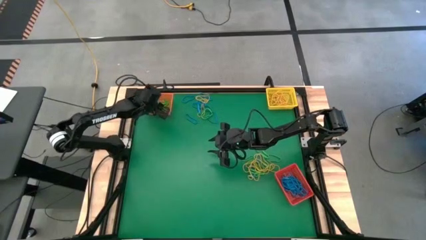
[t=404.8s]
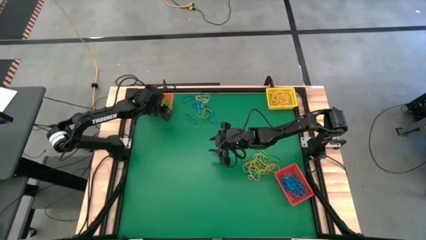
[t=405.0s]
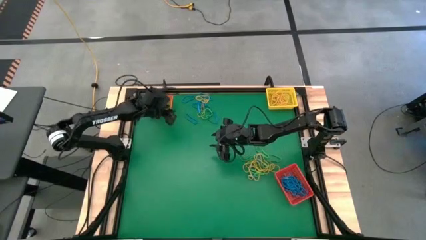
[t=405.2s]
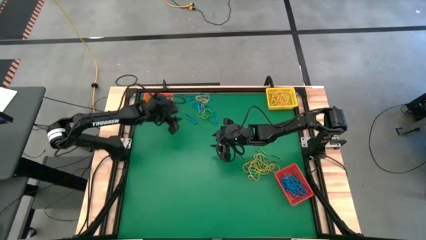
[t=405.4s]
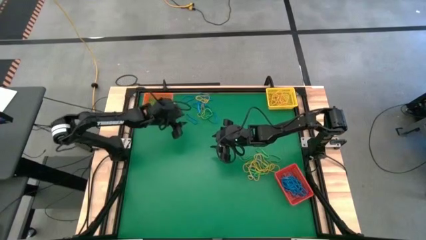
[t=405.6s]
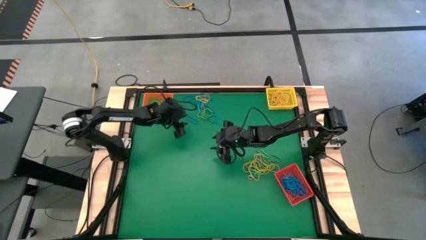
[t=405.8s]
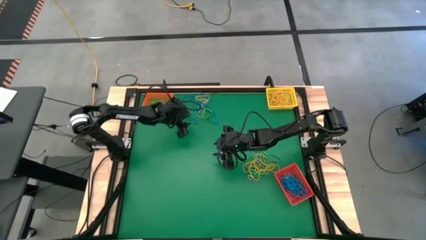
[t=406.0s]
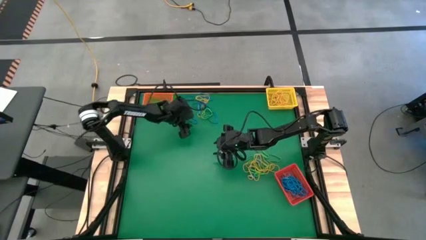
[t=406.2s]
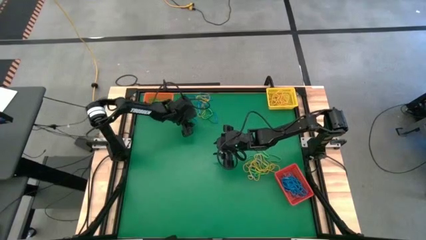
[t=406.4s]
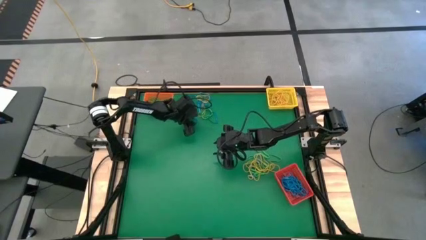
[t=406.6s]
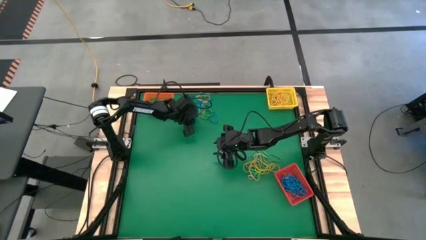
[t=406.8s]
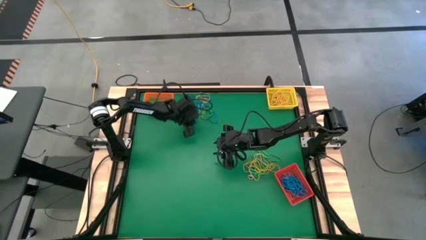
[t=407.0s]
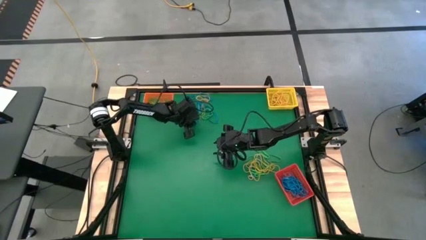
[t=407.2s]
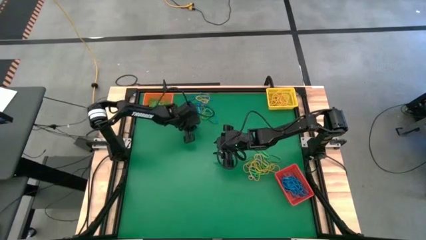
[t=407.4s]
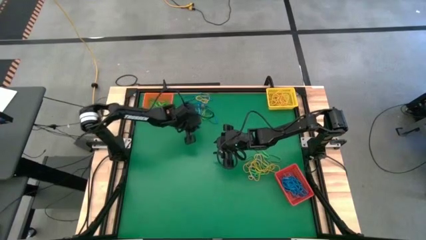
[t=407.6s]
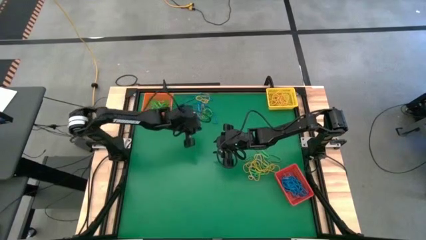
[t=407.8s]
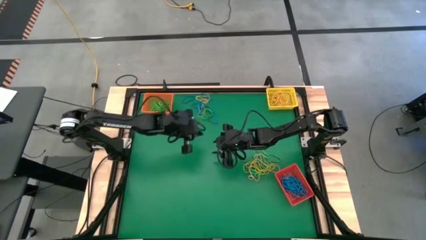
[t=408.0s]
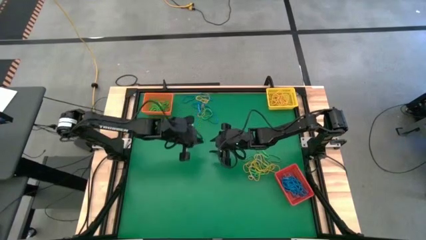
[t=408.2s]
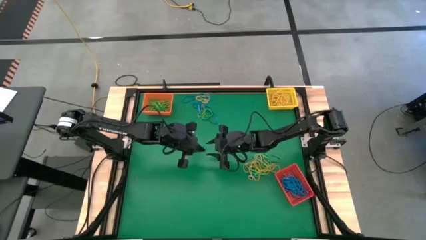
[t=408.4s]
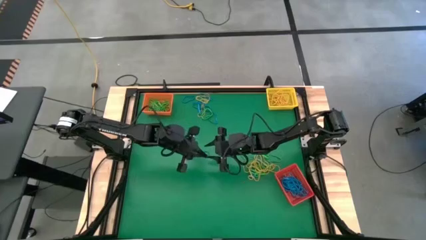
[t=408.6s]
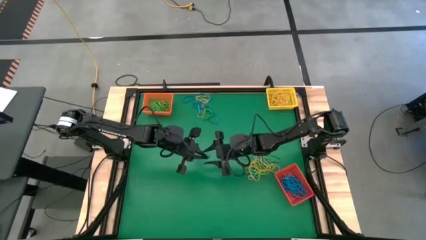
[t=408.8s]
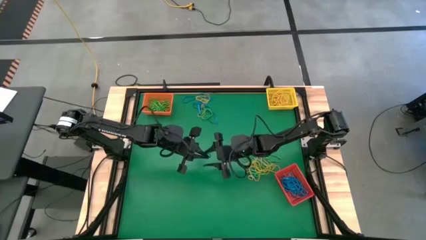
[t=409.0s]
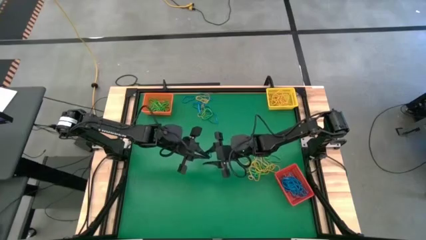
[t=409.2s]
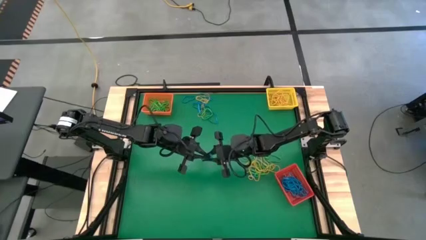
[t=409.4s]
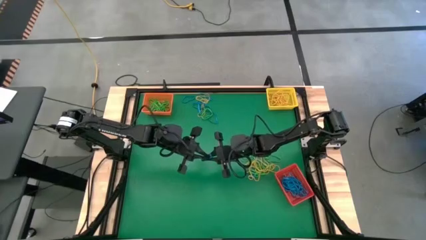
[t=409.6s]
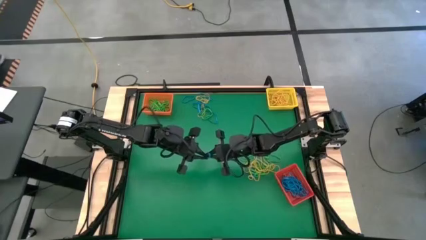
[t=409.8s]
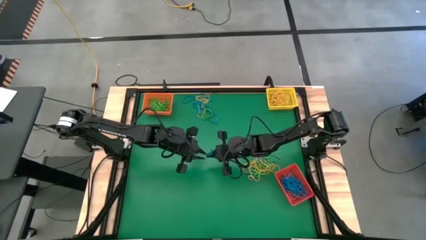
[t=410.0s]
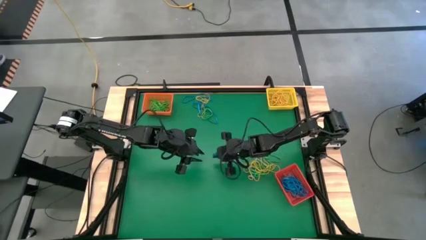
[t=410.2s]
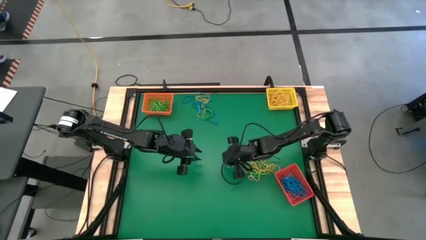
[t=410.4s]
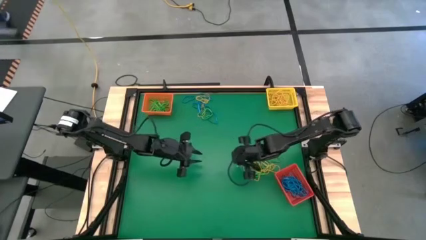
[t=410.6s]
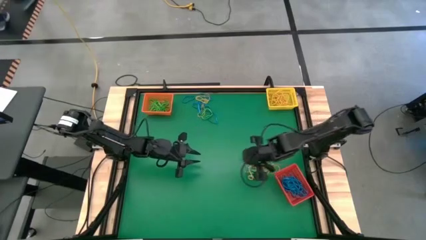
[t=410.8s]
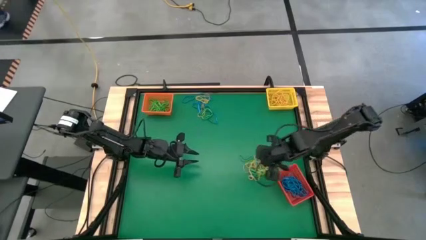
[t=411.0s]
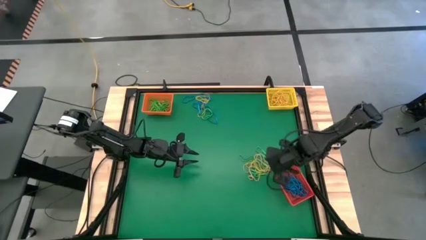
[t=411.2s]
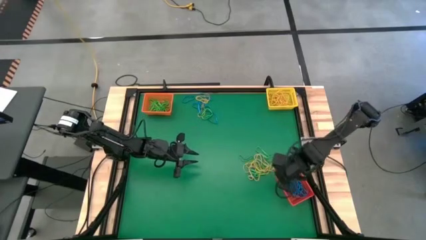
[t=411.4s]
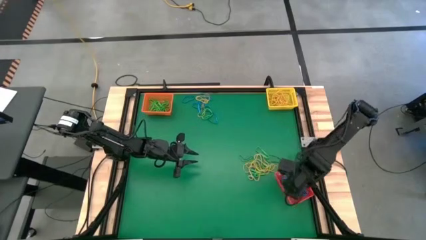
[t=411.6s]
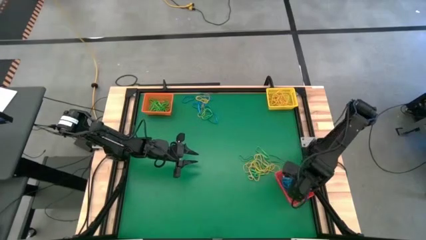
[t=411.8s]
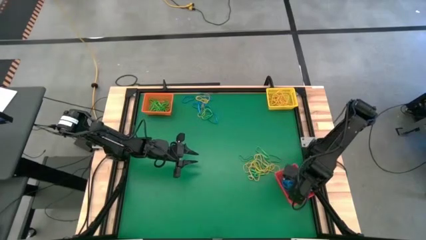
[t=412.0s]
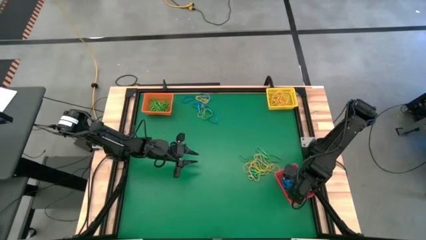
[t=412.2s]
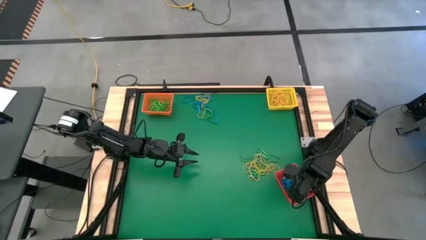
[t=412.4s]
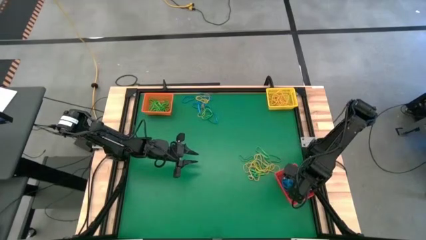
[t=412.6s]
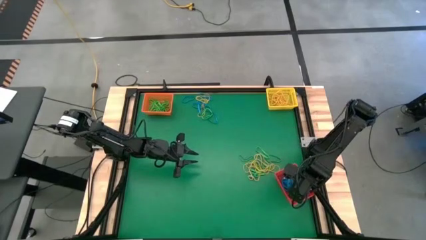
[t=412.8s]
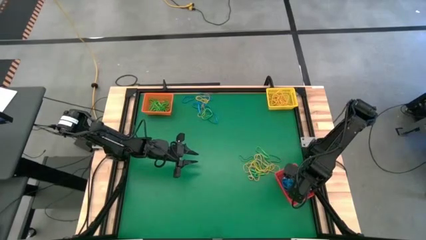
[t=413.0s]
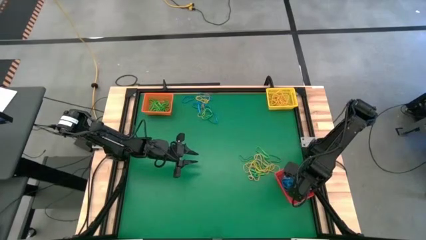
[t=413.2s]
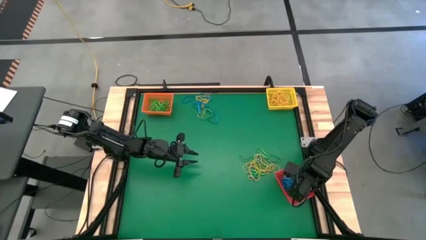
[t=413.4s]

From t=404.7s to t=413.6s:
Task: Sort rubber bands into baskets
Put the blue rubber band into the red bin

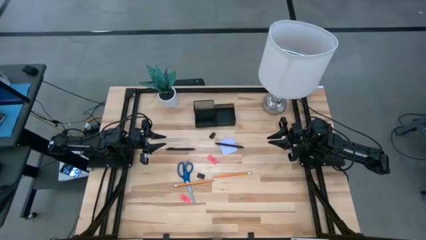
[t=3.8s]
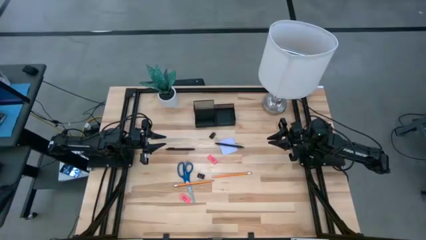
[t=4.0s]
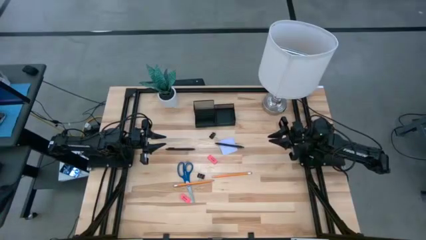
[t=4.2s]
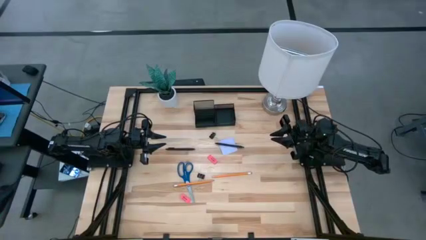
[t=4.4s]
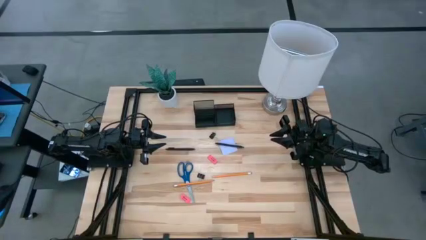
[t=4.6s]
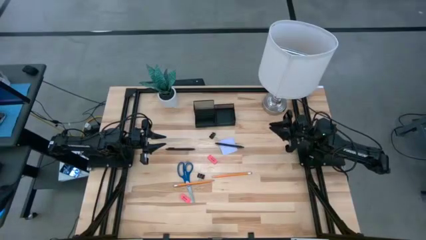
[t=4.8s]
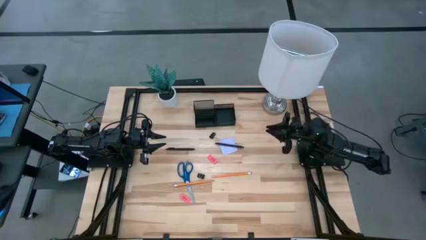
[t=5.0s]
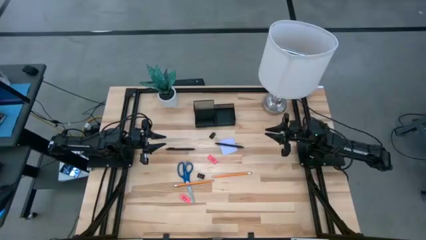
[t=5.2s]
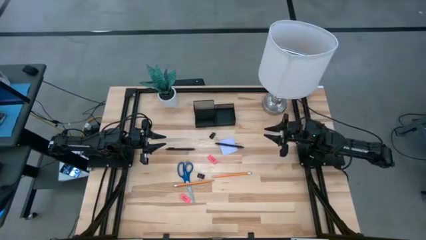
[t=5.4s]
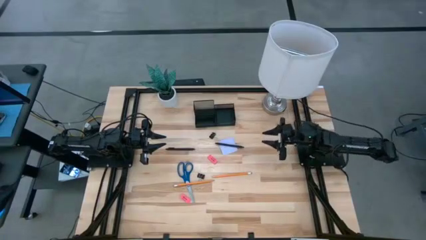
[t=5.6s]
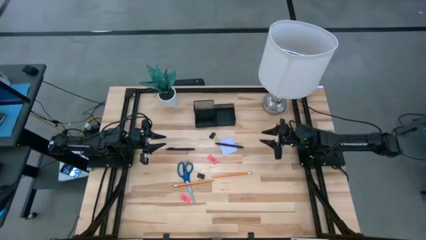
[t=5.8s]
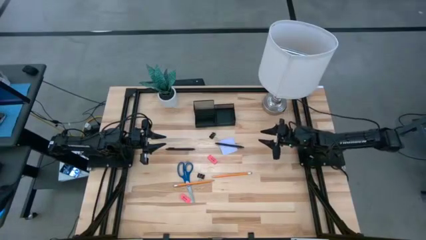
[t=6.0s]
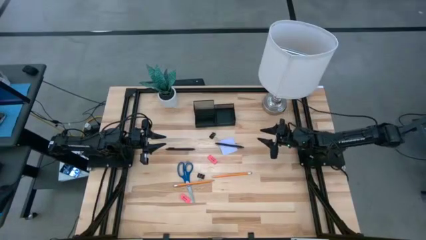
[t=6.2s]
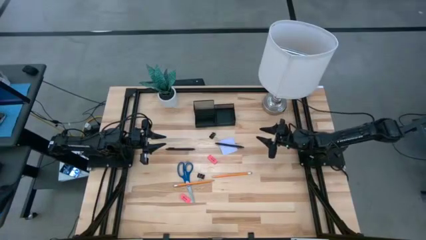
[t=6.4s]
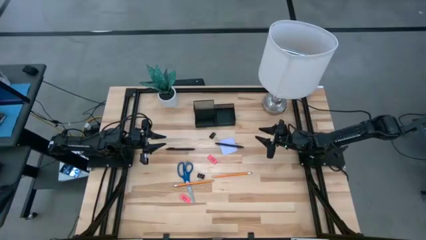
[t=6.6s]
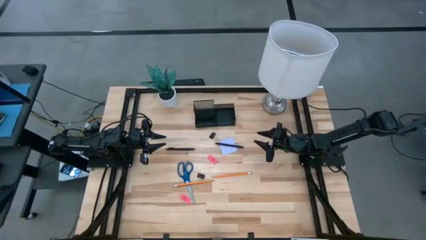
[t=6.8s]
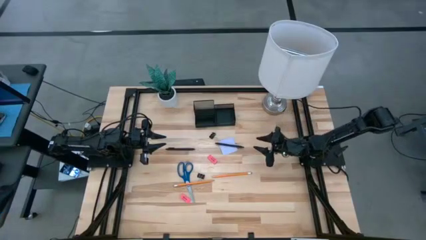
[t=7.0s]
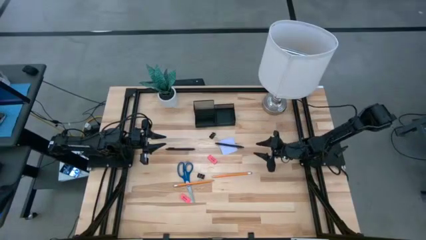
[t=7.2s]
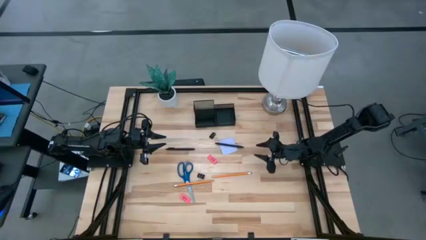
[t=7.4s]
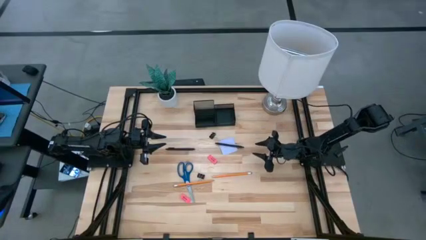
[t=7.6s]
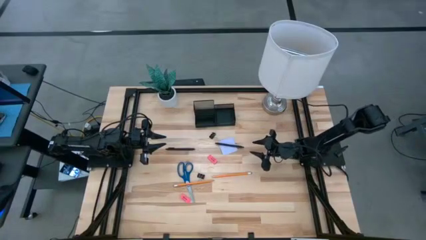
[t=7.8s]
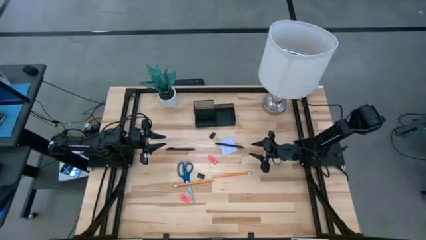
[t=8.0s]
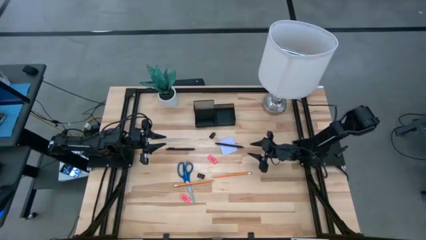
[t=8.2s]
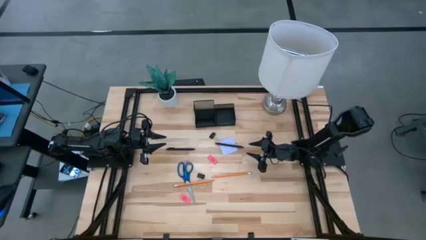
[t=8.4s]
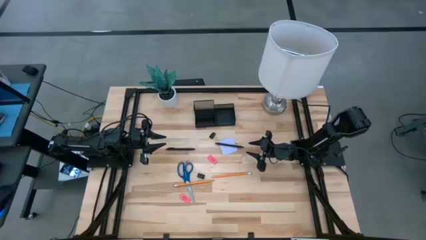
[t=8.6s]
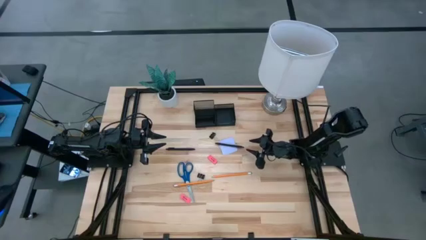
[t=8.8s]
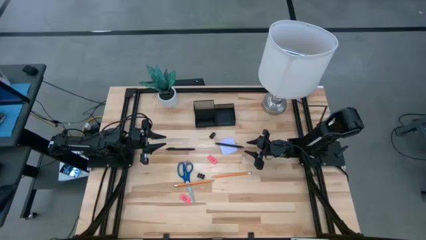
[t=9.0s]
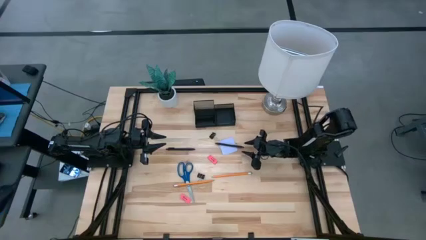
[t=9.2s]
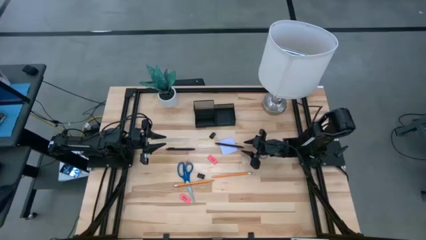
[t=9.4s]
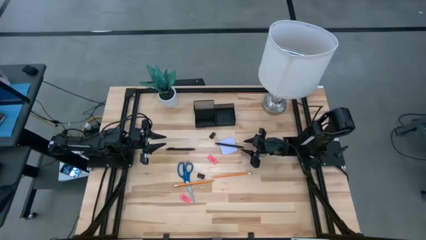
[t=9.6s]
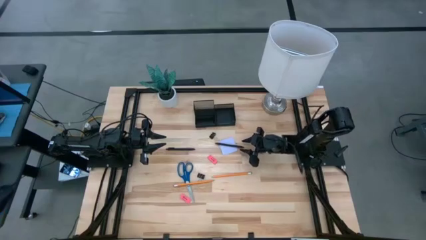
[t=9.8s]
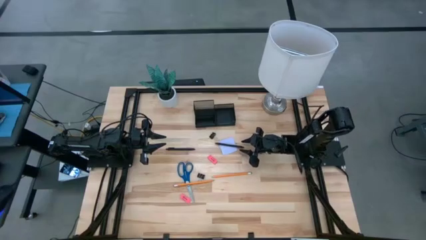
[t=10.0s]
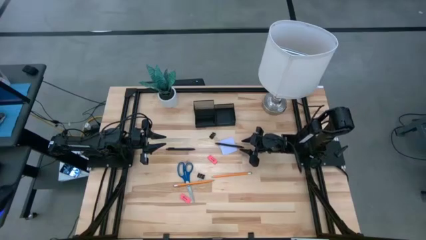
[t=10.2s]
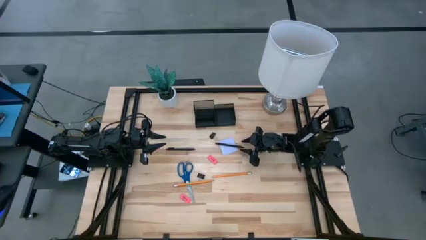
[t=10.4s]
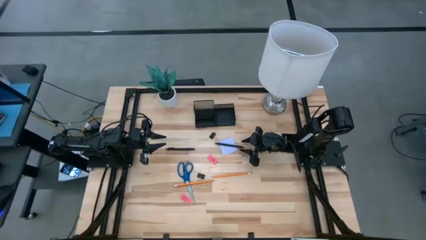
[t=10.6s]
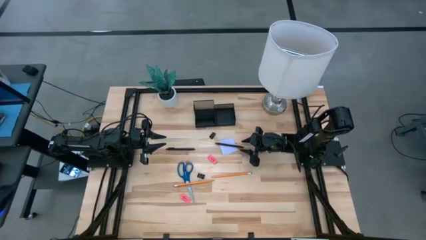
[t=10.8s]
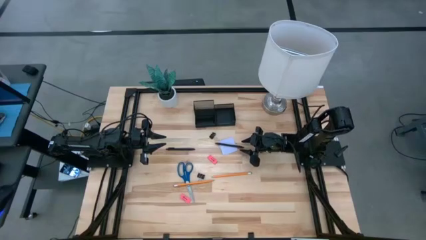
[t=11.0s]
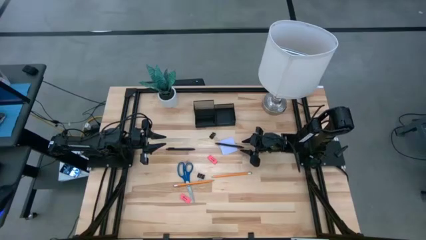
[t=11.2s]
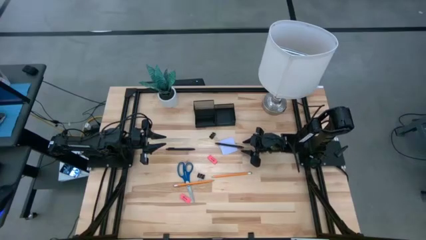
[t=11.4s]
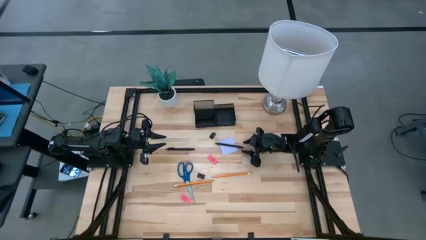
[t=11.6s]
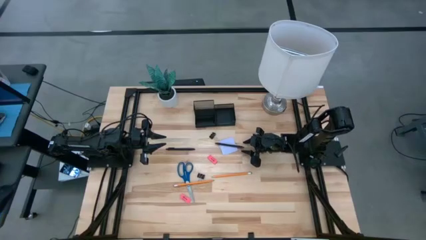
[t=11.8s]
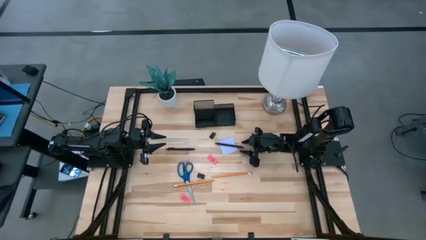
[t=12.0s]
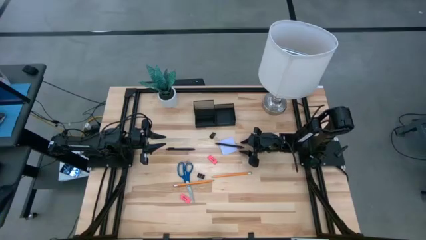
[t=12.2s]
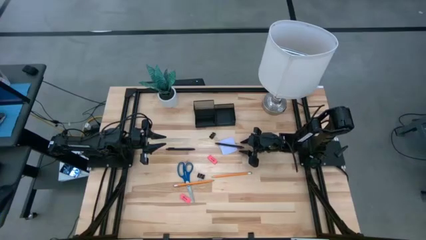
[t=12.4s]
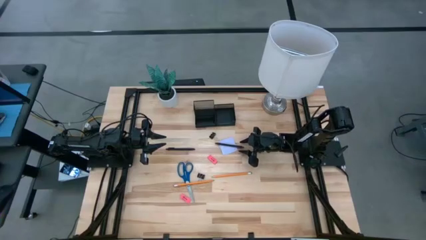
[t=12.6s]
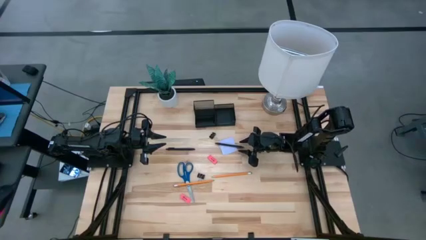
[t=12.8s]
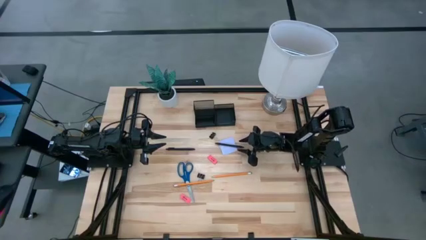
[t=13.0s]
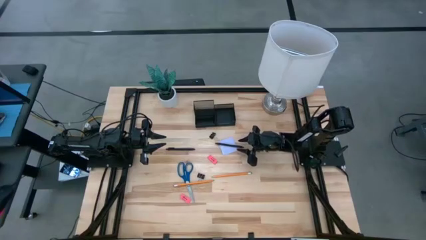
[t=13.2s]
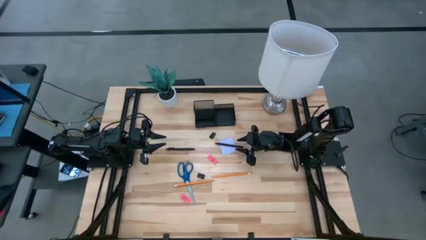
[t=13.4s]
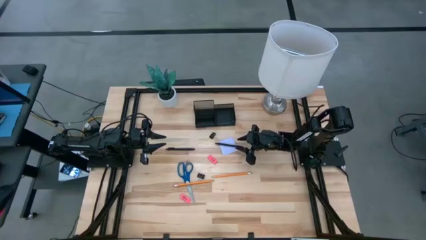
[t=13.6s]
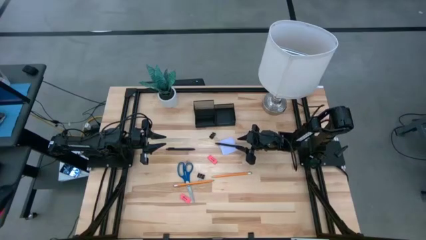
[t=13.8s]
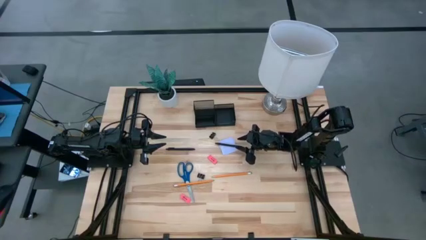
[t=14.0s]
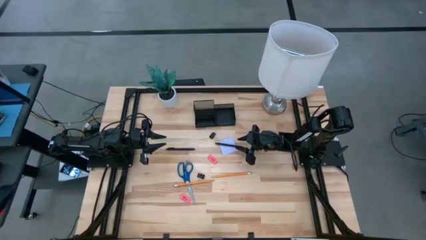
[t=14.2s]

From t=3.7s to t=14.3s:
Task: Pick and place office supplies into organizer
Put the right black pen into the black desk organizer
